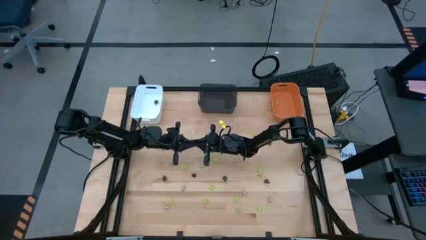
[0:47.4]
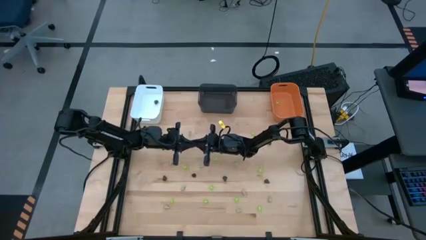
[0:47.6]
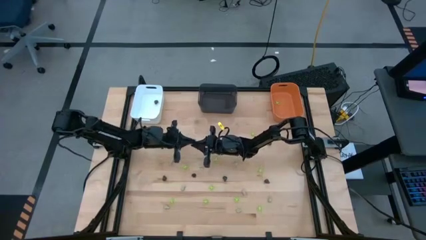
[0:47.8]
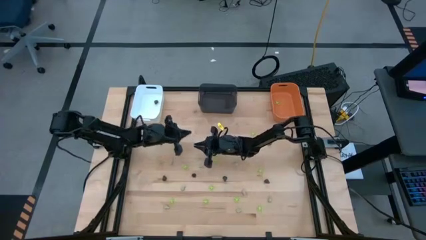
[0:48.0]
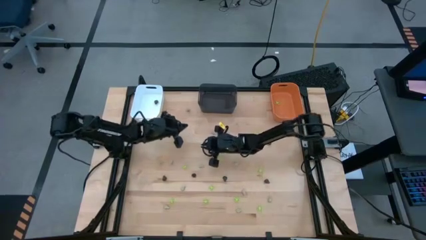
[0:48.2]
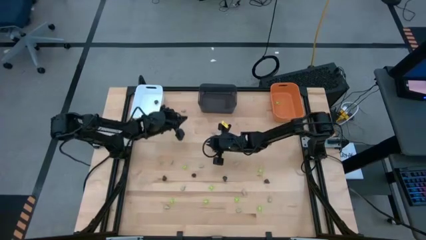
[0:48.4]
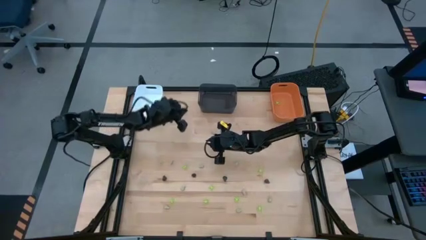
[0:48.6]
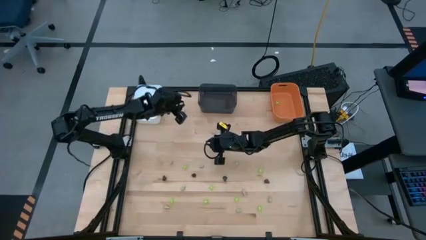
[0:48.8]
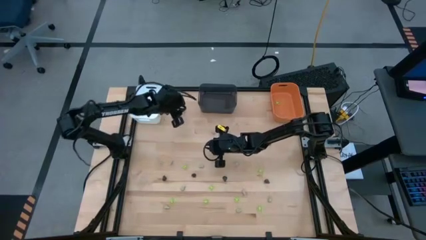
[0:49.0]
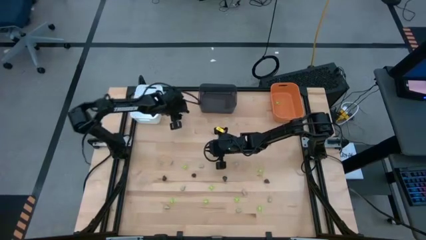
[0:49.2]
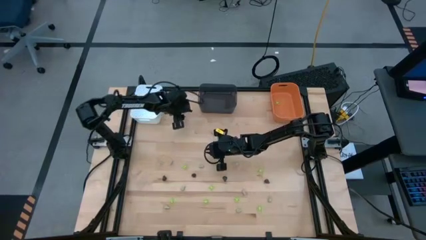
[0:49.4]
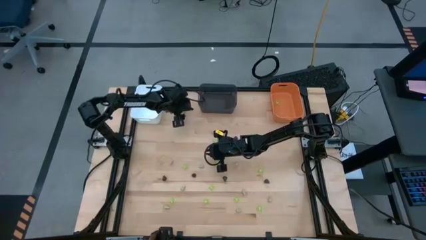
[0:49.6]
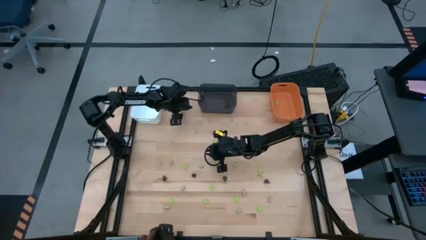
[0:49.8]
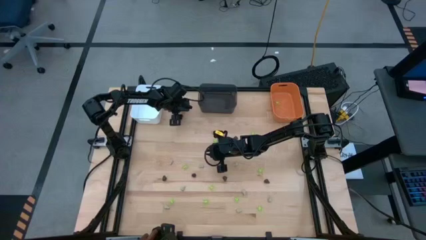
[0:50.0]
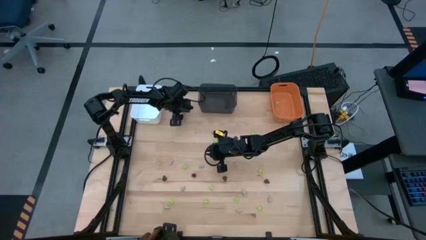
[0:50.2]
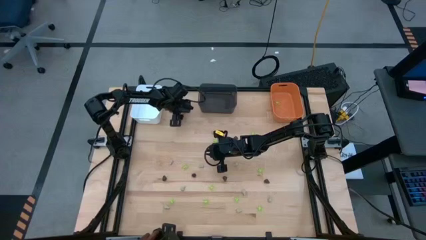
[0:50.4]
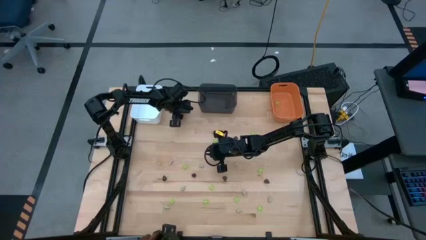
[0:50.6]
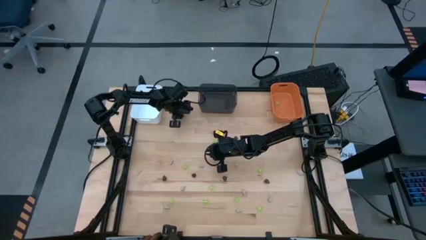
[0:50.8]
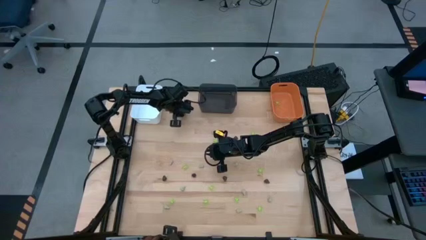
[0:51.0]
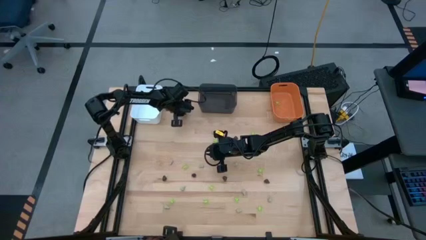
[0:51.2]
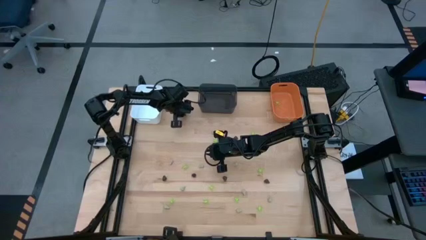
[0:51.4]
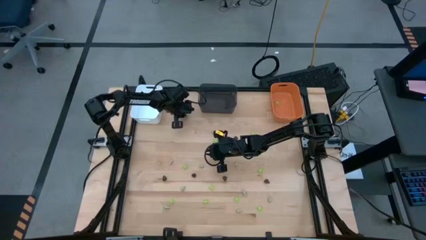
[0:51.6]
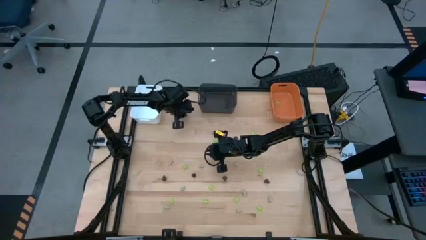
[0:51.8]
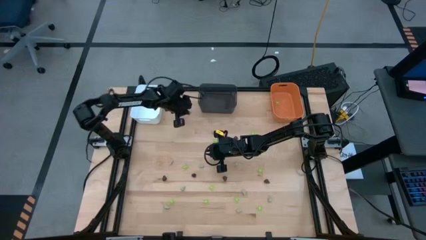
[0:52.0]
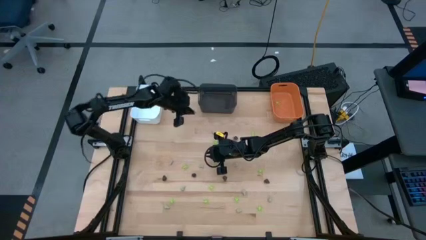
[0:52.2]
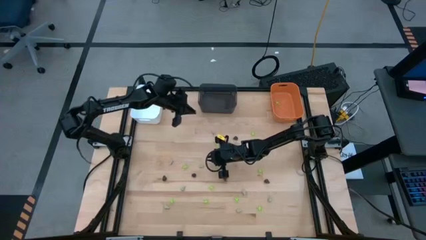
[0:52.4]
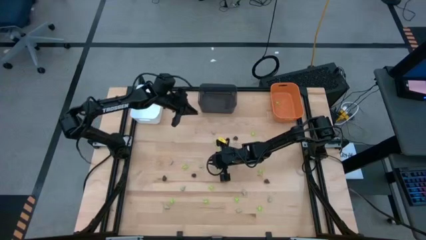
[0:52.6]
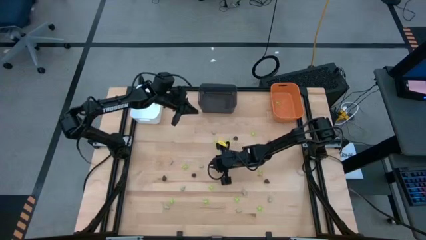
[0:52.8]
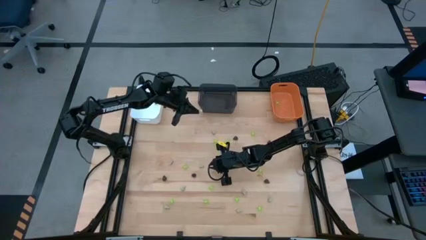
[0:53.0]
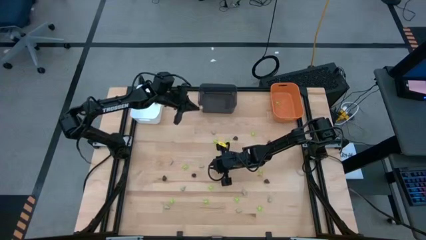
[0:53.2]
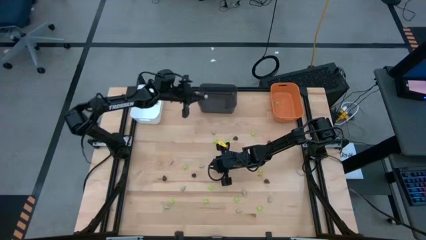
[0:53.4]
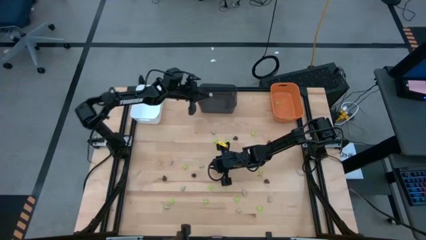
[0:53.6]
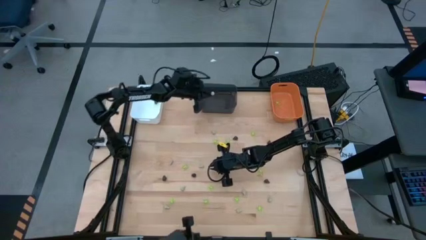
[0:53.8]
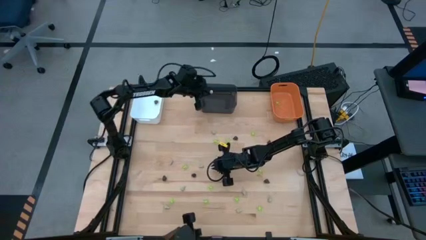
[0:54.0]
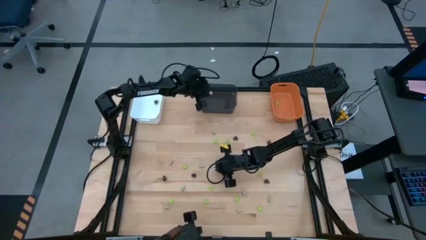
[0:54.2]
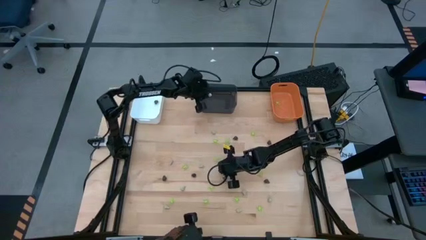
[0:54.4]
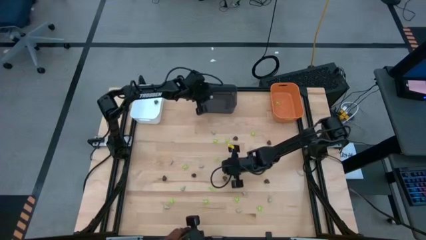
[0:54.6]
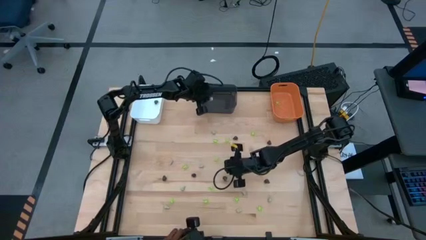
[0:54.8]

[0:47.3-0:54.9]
Task: Sort Halloween decoration
Put the white toy skull into the black bin

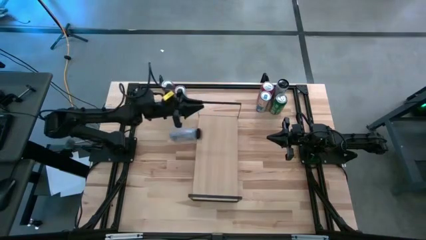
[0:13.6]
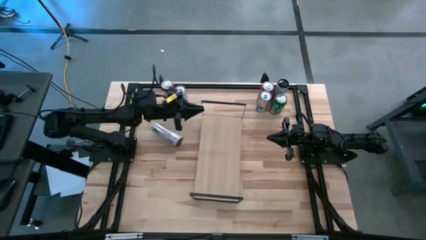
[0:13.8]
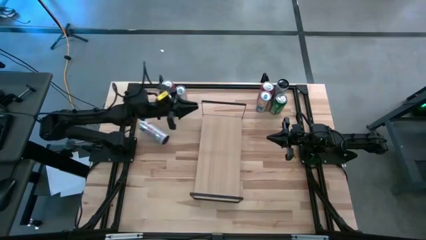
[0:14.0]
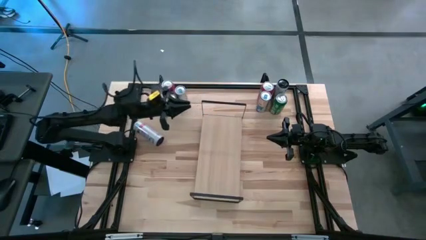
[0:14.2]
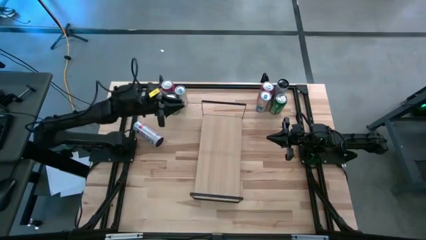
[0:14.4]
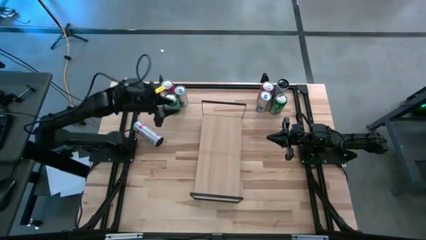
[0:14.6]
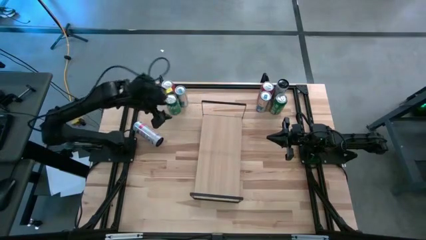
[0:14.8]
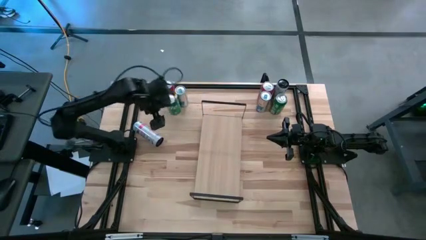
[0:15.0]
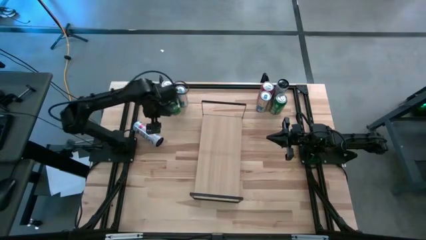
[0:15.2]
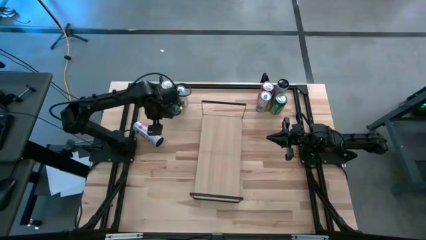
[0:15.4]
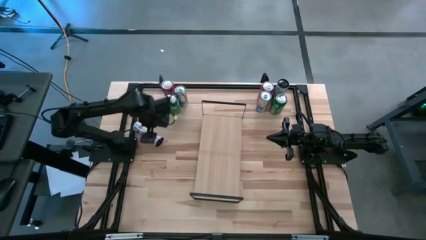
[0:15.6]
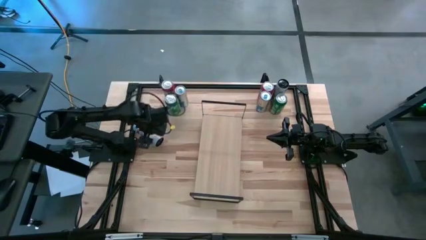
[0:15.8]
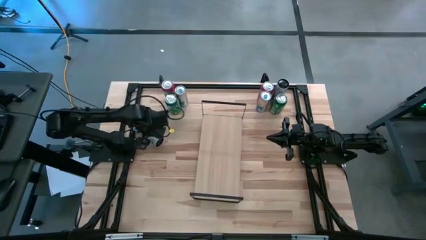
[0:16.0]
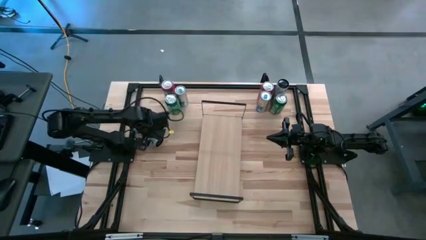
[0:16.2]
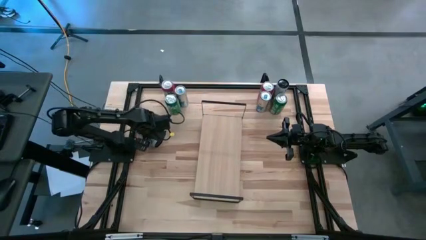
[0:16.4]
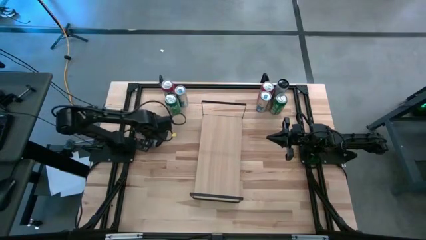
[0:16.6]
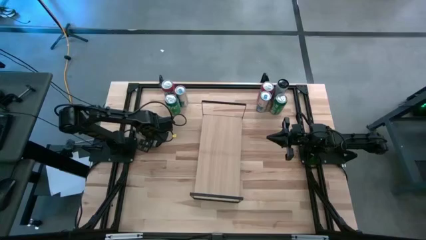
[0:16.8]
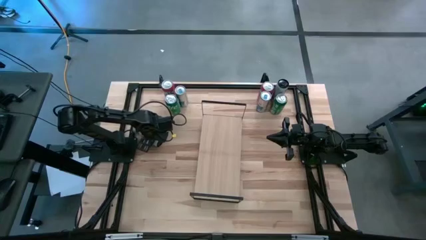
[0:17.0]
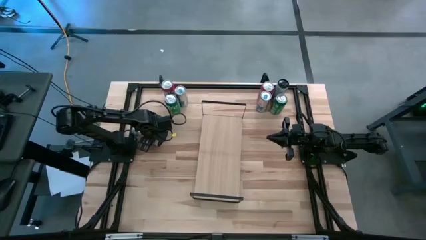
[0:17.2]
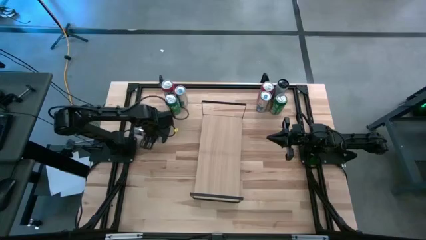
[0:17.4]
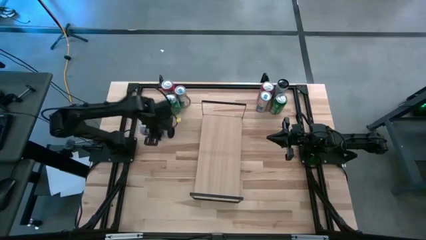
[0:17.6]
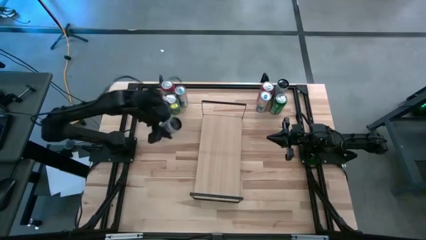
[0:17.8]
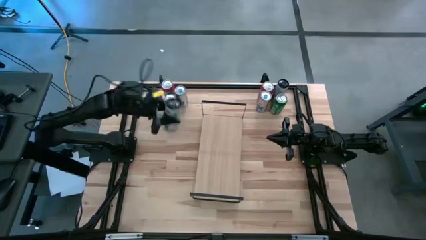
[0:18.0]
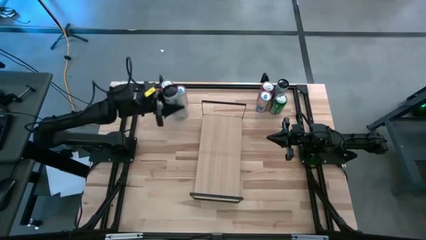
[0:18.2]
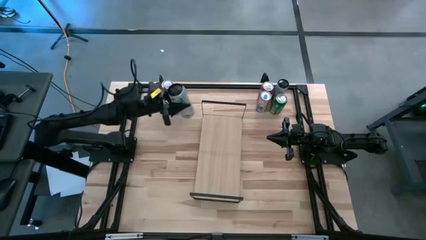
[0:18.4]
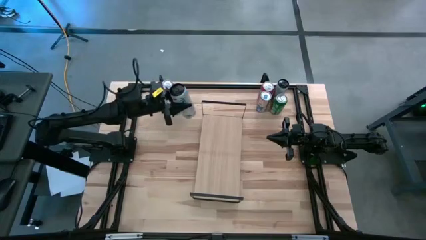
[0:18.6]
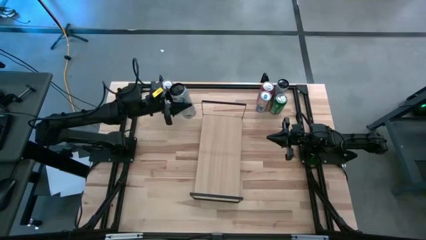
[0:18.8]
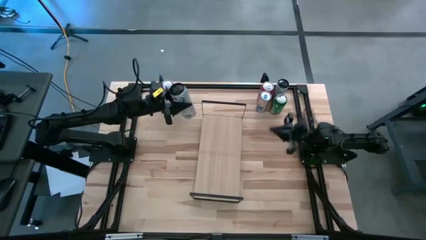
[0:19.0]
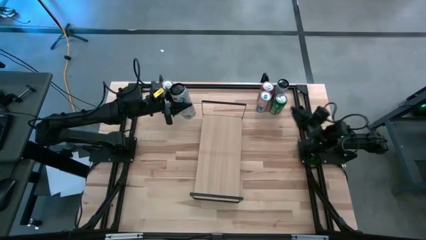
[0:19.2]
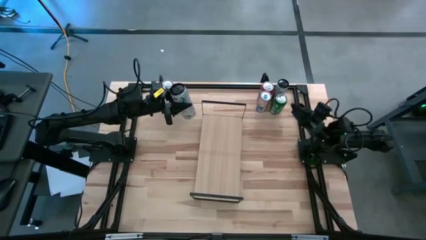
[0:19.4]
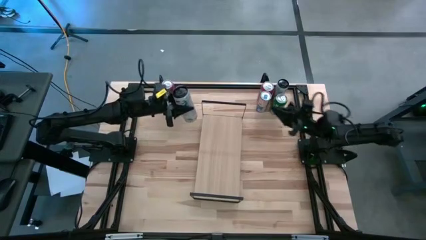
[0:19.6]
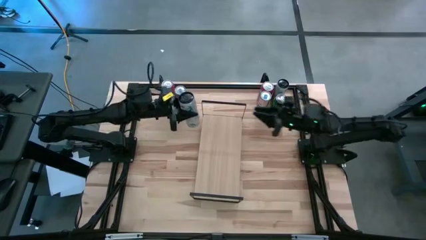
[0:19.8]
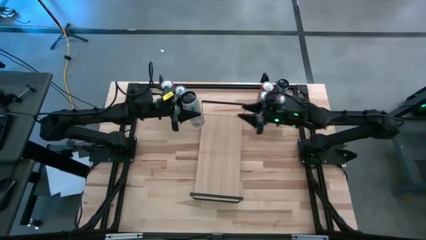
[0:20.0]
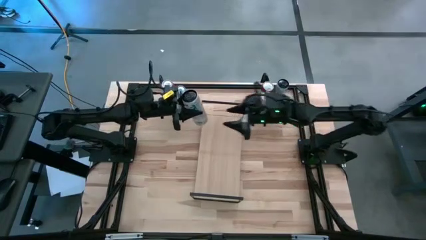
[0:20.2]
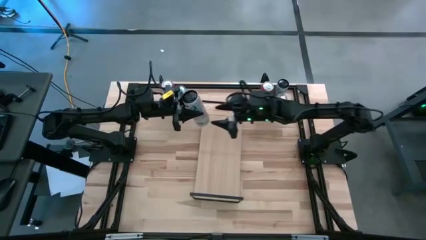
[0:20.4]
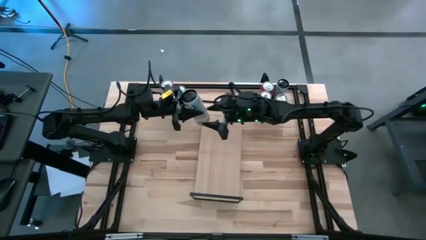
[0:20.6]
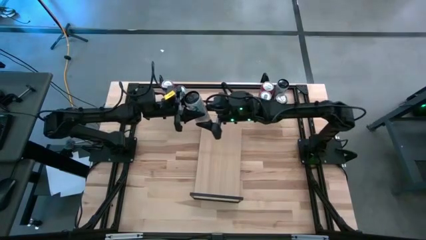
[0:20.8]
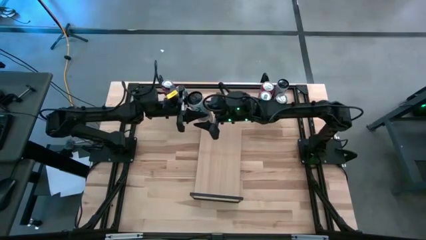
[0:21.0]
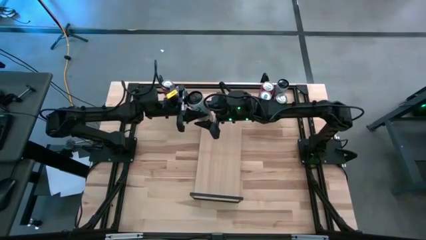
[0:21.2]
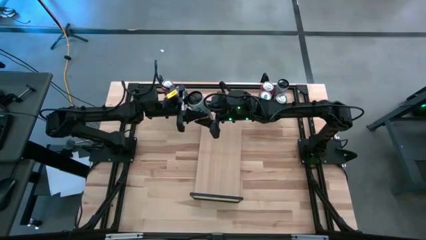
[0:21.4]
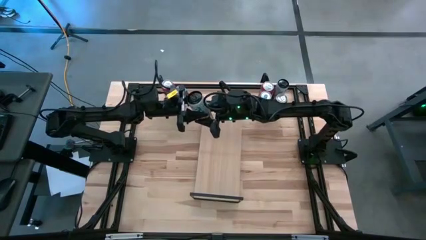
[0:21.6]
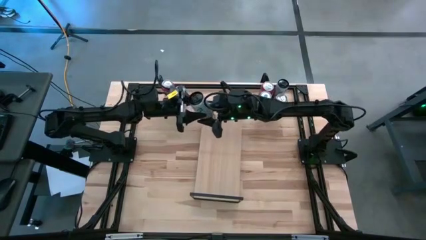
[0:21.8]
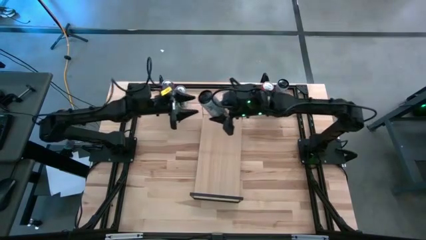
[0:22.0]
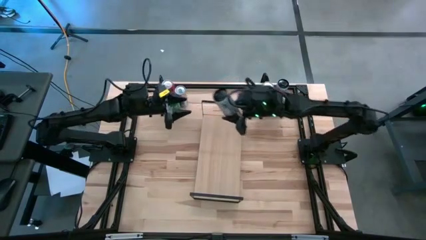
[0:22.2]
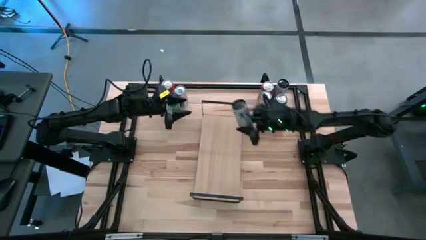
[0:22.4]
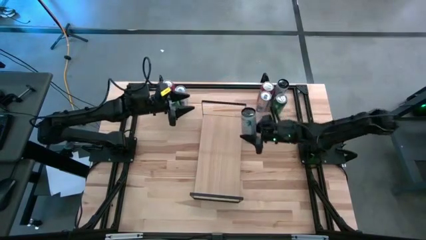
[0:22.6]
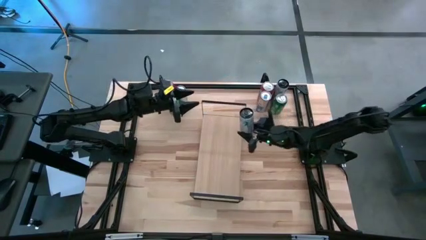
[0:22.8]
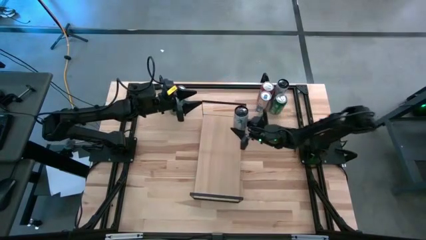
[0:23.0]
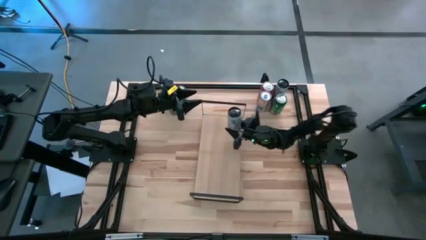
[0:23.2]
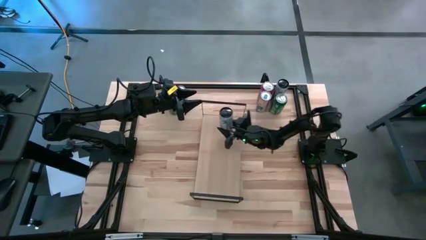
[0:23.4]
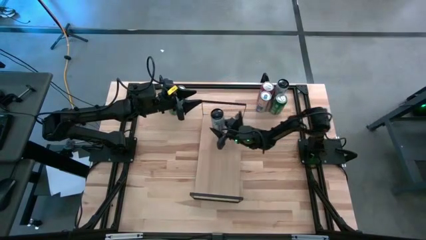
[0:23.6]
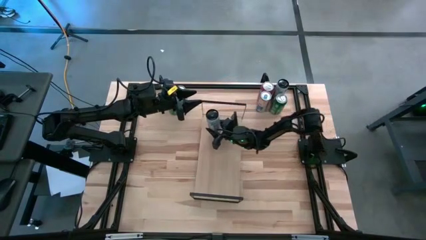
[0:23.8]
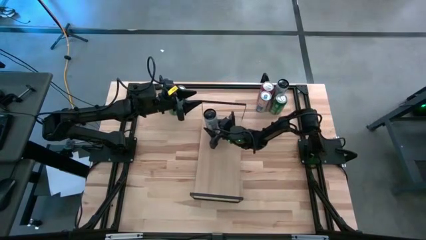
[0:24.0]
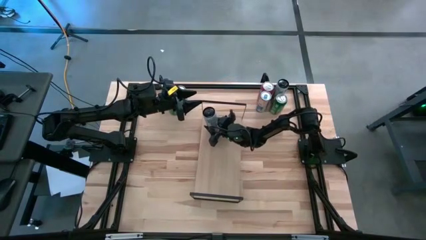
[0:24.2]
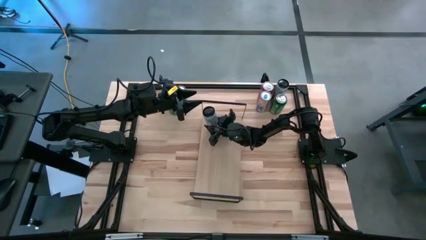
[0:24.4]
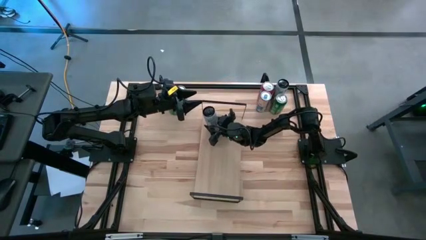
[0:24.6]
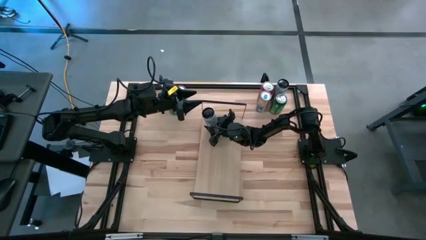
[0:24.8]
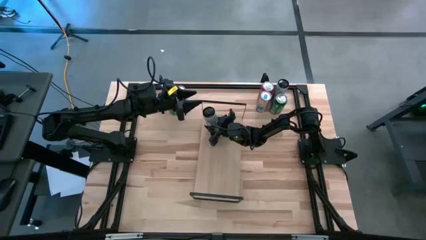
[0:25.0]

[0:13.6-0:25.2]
Task: Place canned beverage on shelf
Put the left white-pink soda can on the shelf
